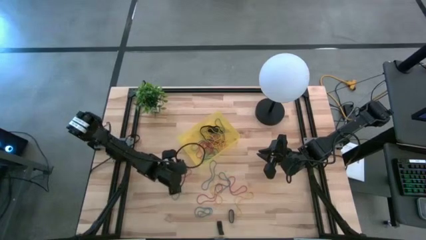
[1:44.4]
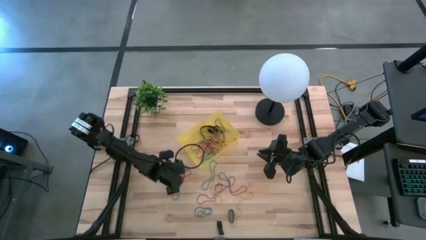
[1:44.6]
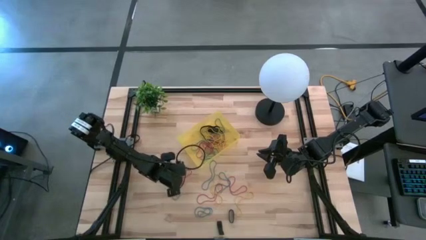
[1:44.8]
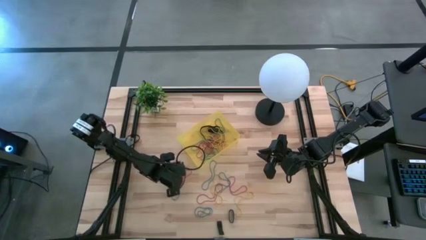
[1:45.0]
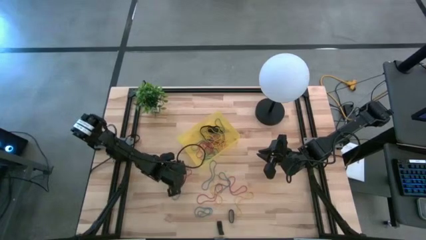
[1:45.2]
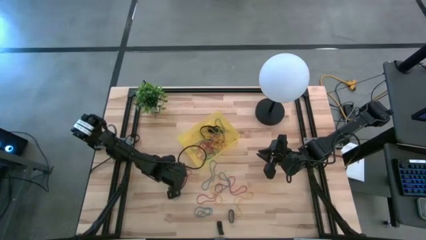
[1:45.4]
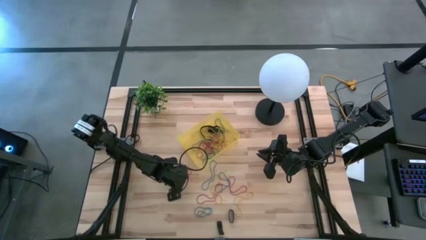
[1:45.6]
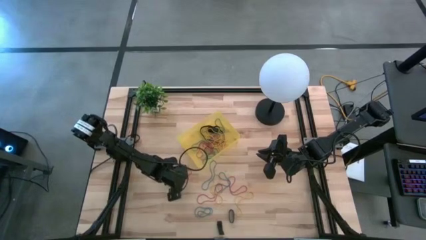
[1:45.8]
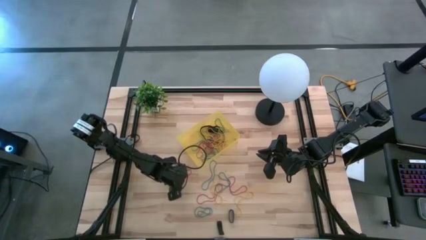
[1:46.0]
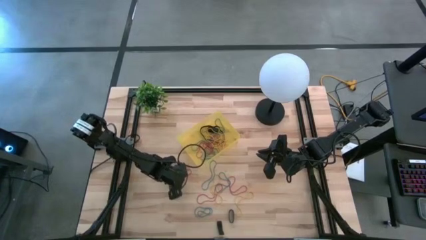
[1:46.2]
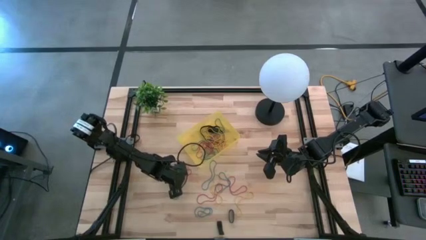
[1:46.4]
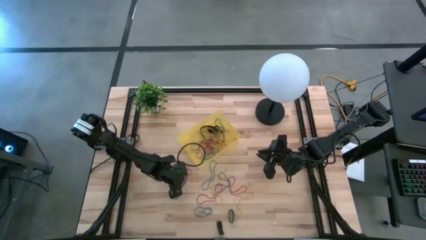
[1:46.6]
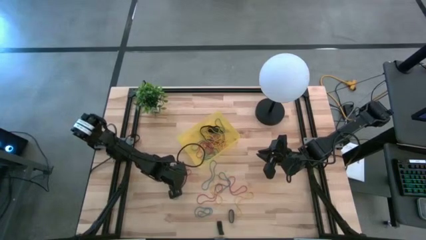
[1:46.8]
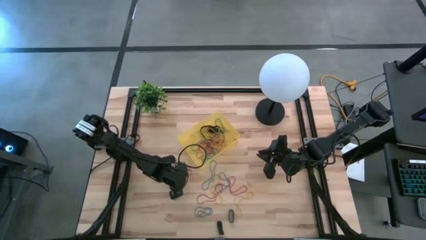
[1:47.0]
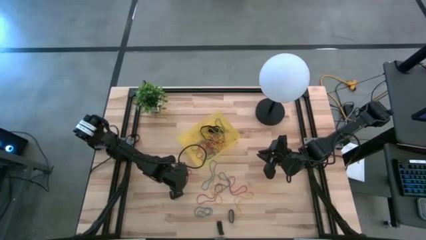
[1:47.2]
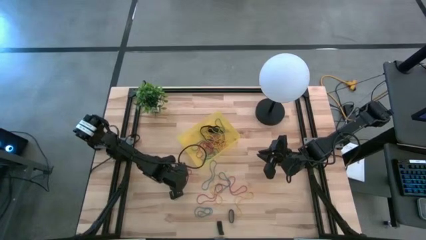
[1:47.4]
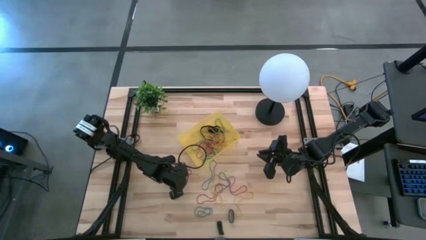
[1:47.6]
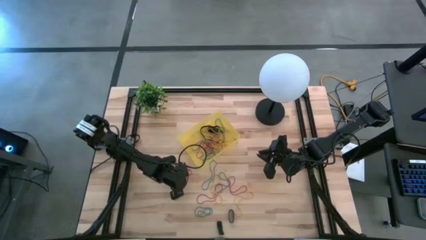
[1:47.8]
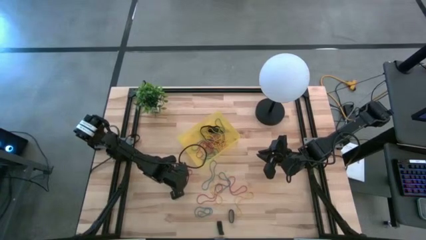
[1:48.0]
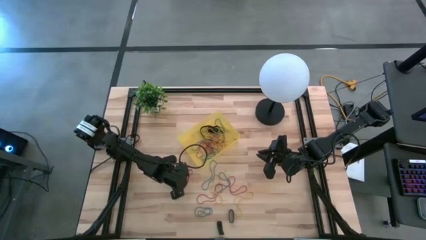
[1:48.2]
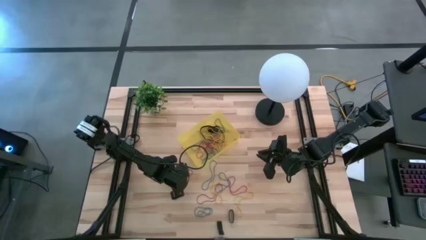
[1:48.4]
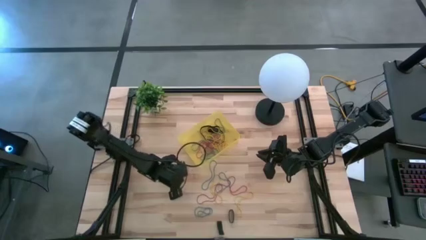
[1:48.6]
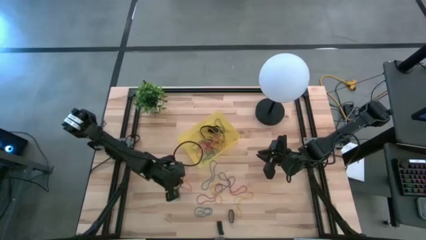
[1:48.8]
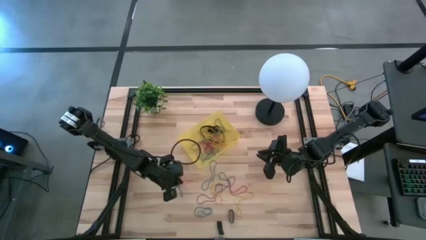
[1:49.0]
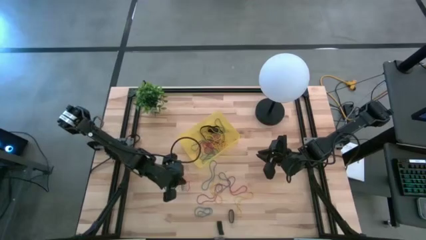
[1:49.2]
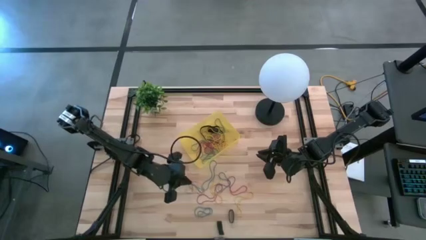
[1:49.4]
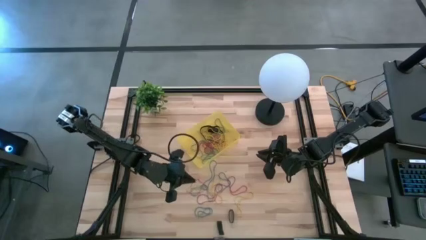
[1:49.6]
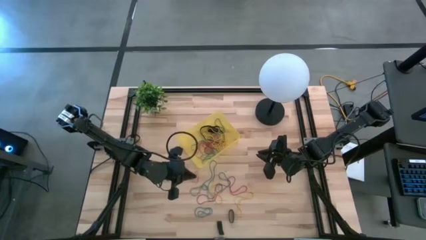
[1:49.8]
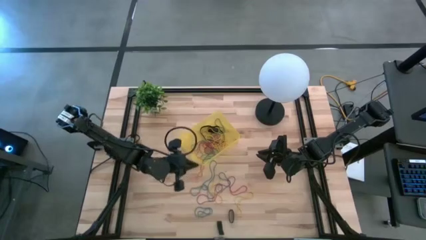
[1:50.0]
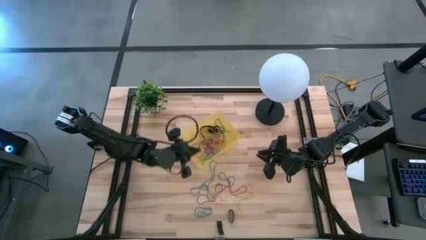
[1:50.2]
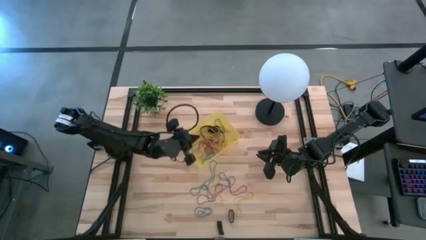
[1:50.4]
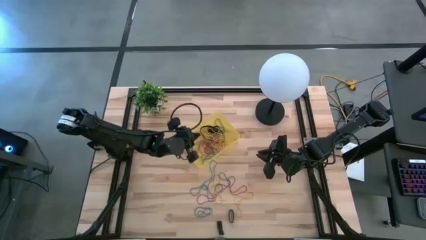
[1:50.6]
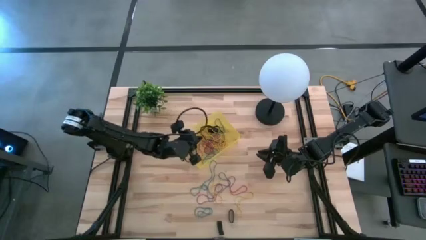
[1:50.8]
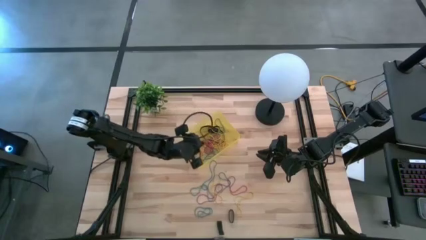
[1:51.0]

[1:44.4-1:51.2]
Task: Pick and place rubber bands into bin
Put the red rubber band into the yellow bin

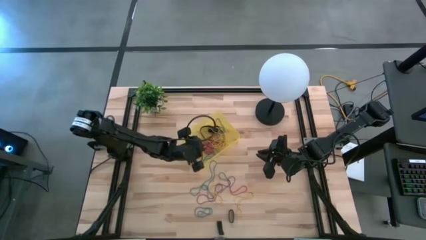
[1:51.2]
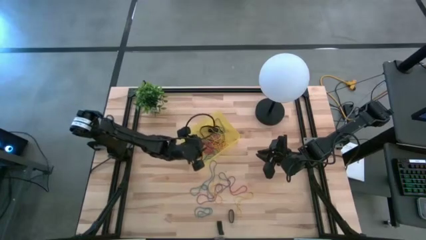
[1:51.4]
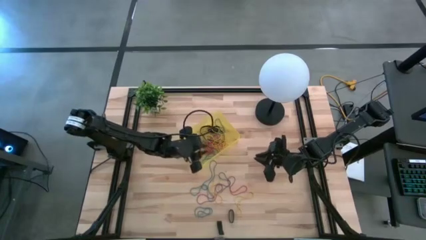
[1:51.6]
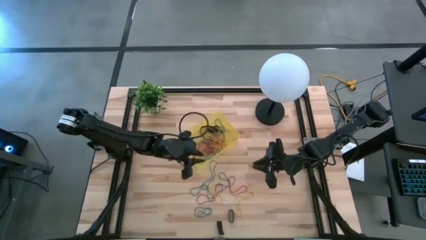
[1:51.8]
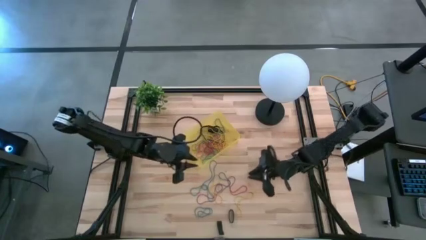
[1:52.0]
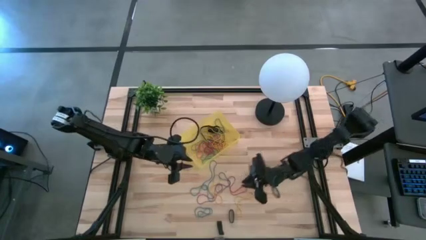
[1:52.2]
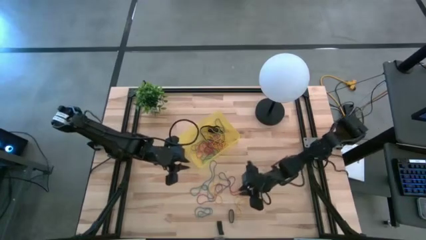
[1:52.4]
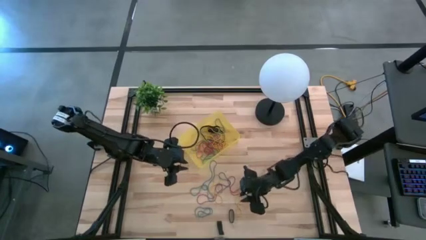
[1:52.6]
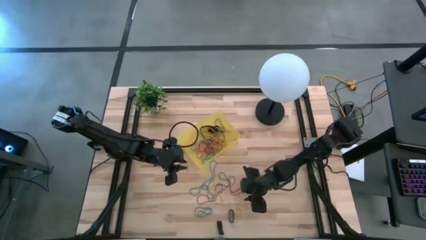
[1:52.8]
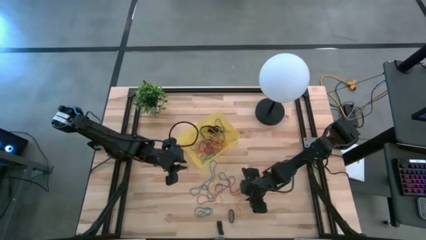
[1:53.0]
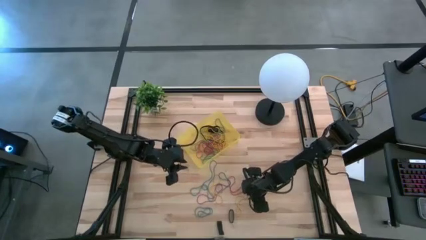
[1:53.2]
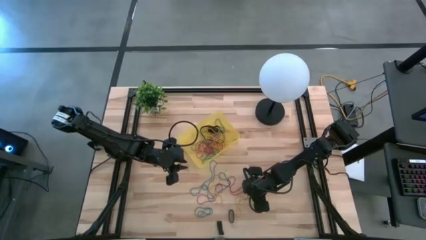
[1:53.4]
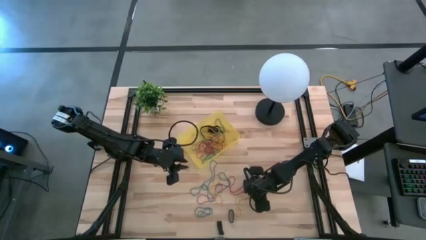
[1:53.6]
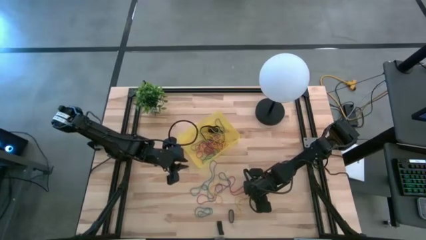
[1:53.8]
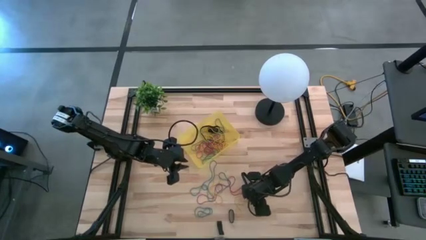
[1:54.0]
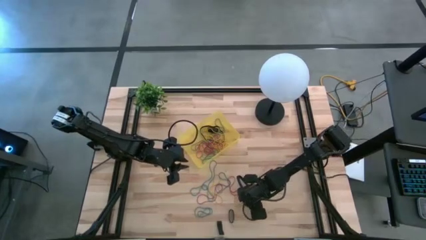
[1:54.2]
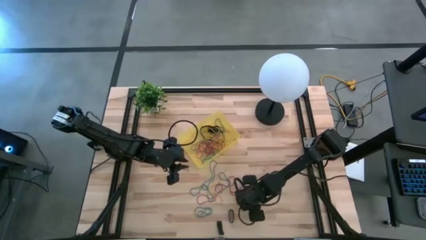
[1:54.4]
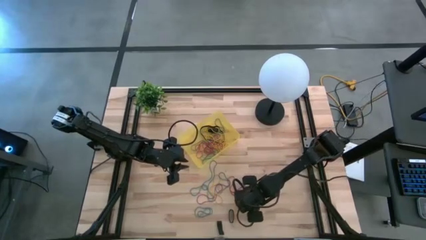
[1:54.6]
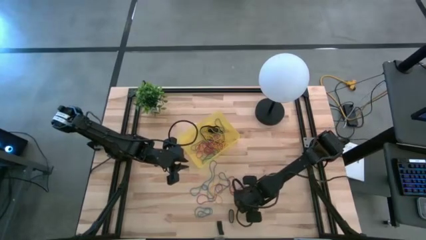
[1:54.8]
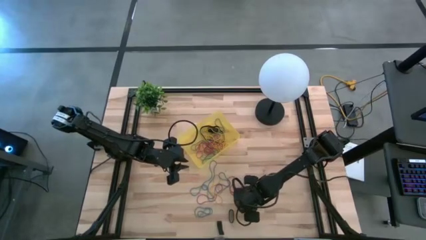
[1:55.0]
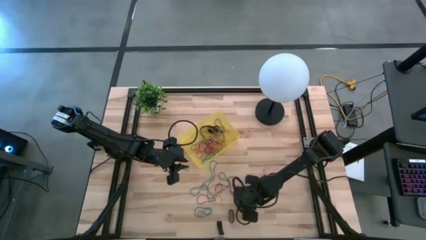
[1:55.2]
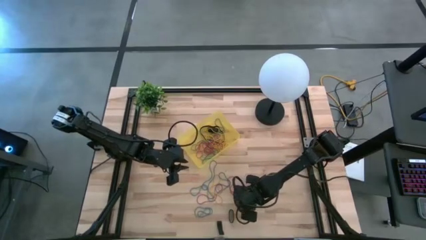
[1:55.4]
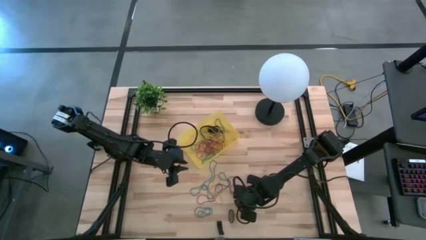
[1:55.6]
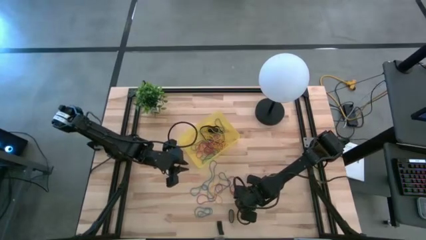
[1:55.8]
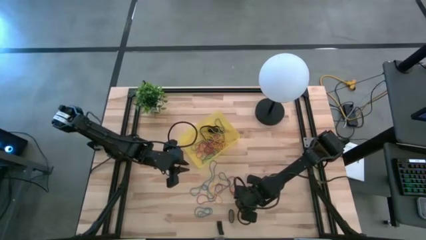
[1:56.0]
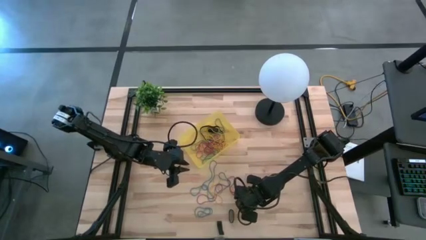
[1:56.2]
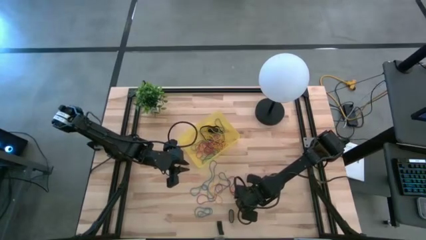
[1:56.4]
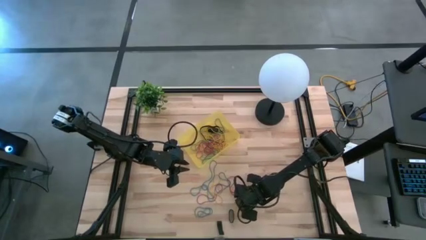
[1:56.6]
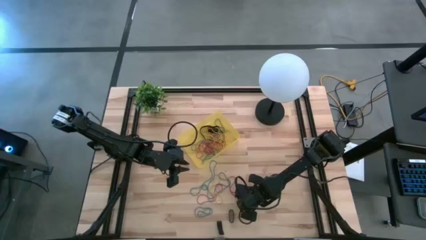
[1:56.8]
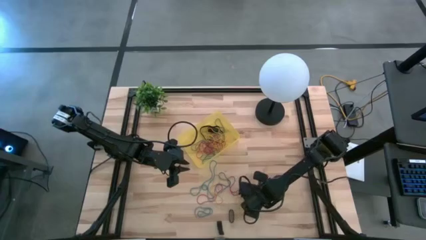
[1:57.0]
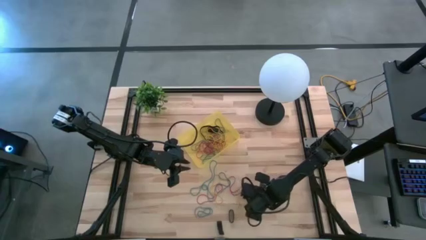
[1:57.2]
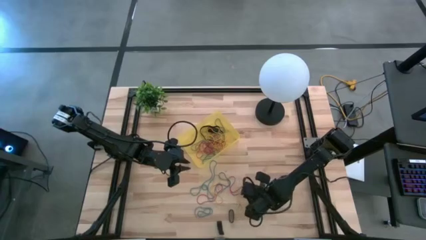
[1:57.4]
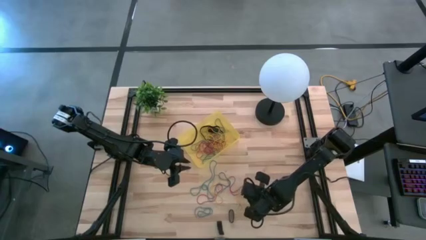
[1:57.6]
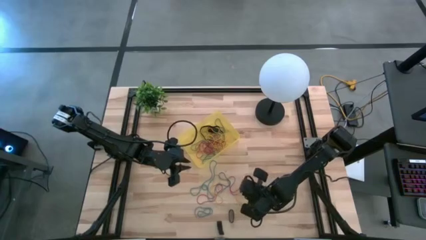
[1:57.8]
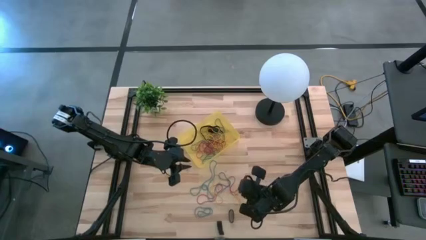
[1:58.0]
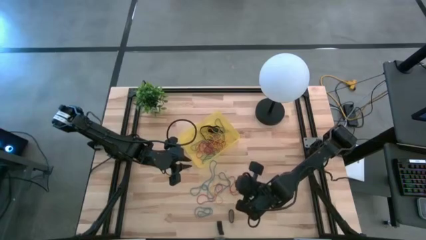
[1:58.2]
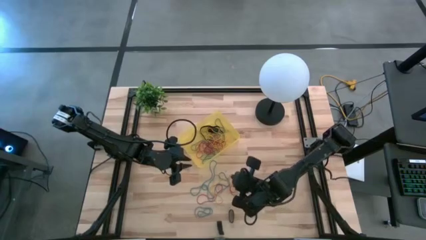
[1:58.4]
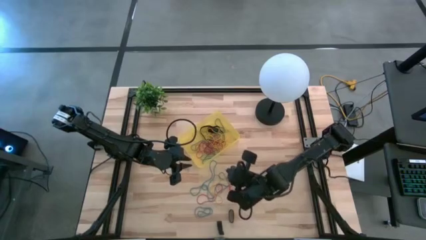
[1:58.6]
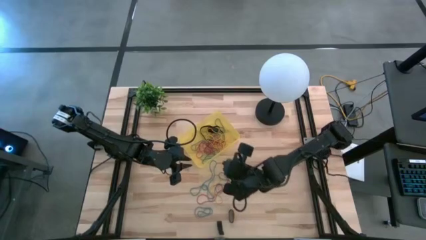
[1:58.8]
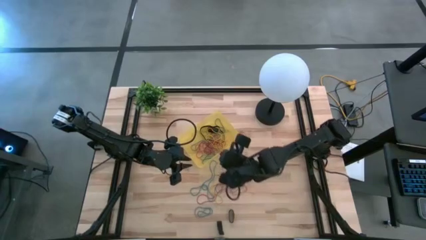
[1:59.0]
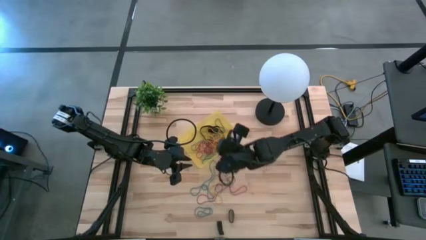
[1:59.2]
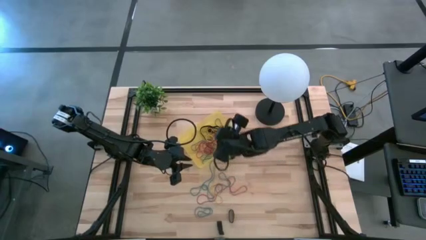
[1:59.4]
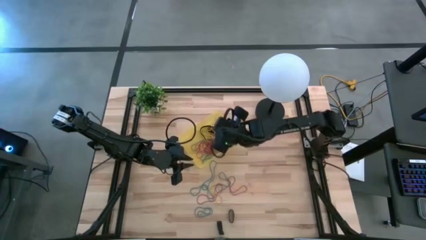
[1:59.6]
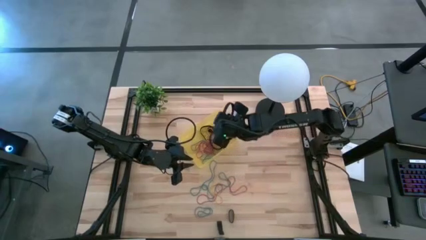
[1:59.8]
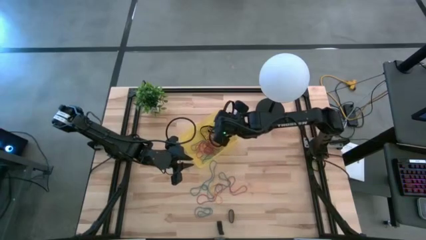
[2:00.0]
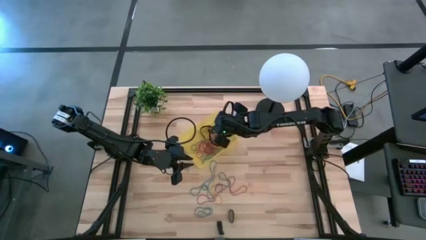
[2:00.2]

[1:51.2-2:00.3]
Put the yellow rubber band into the yellow bin
